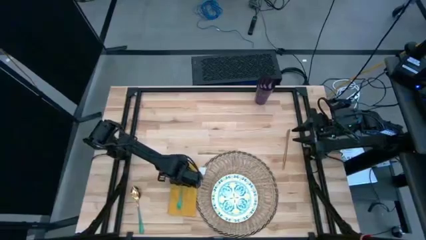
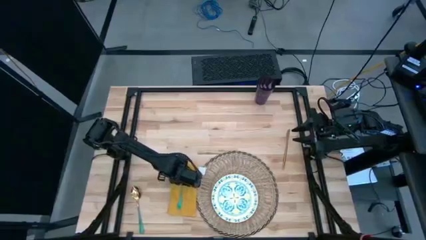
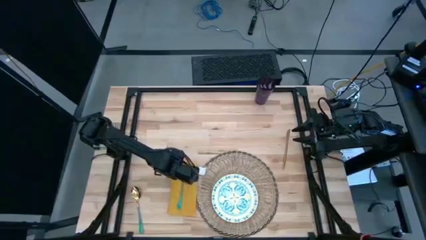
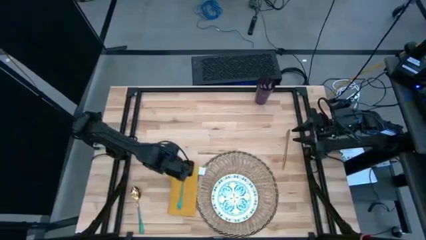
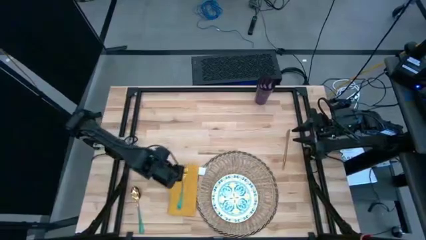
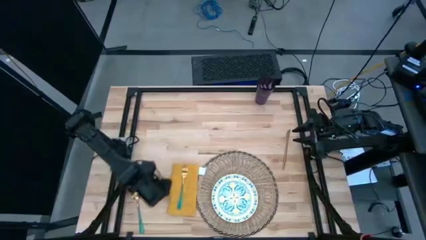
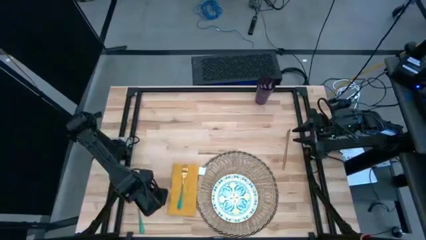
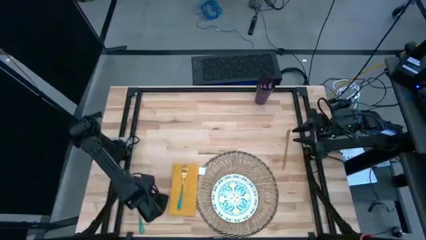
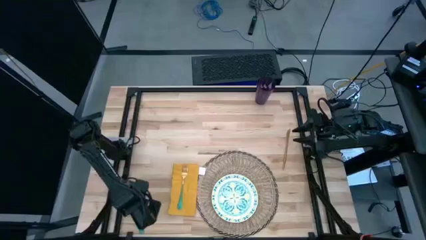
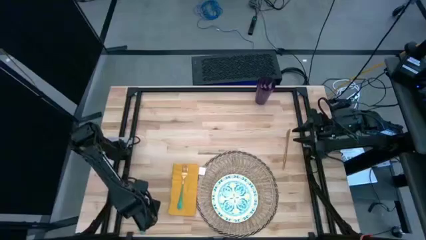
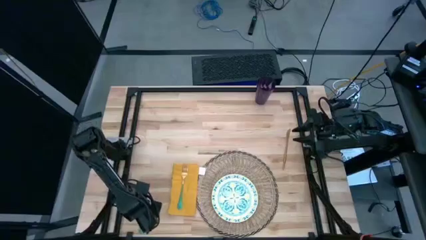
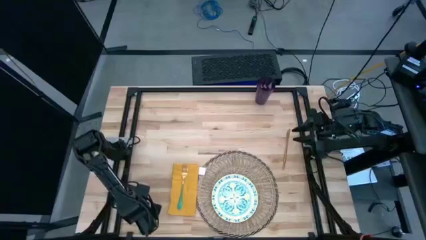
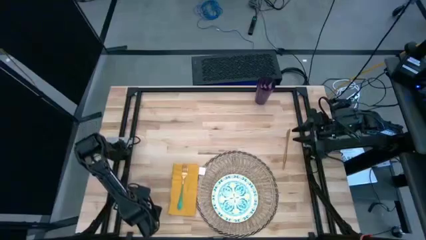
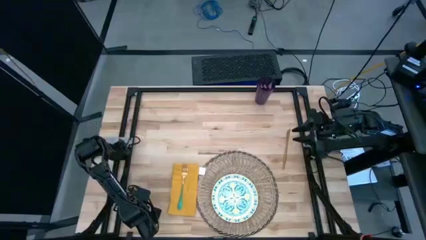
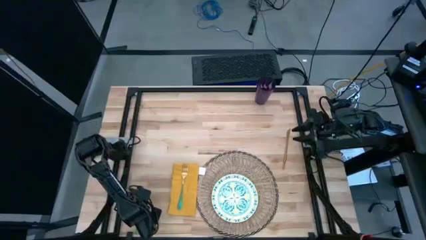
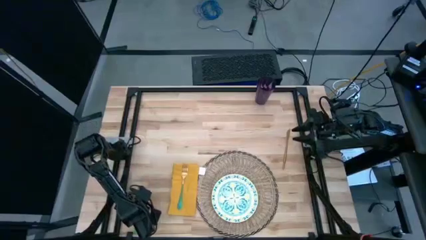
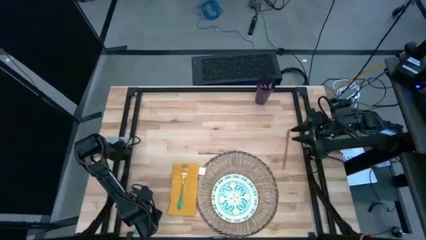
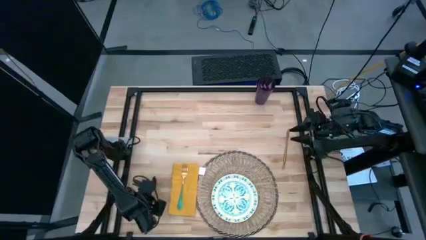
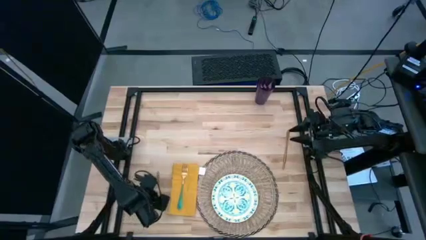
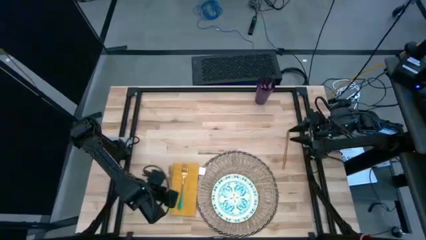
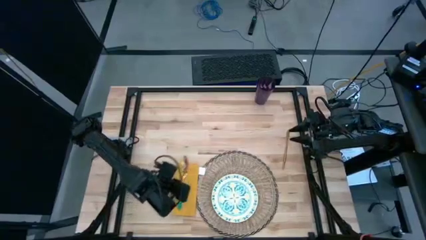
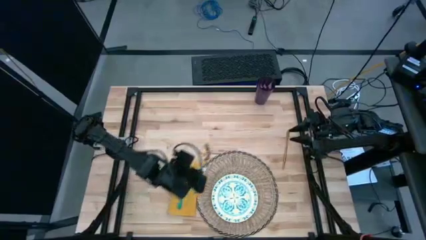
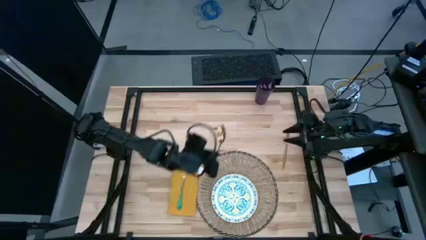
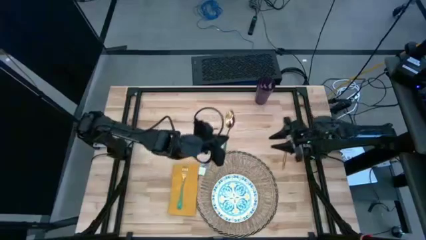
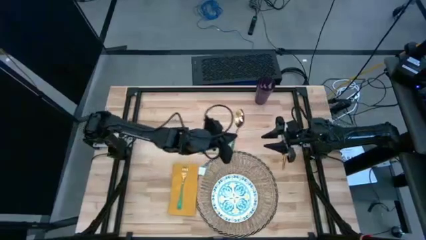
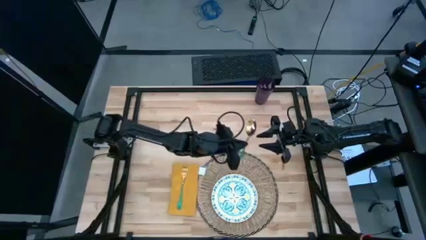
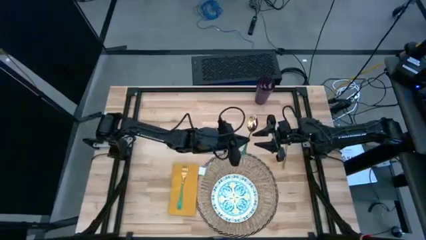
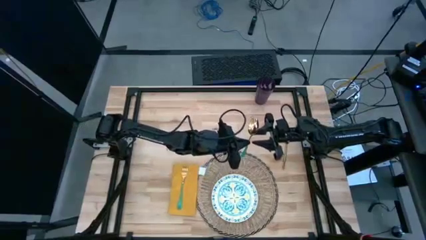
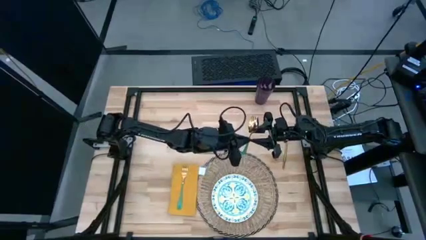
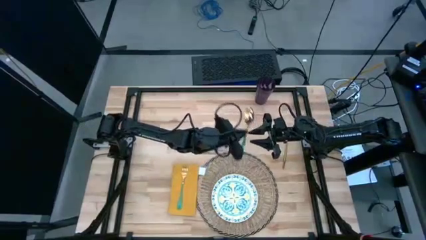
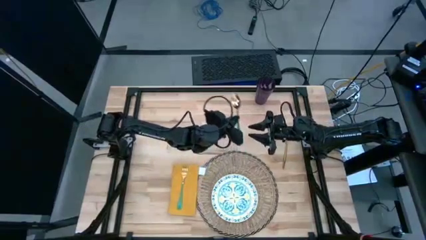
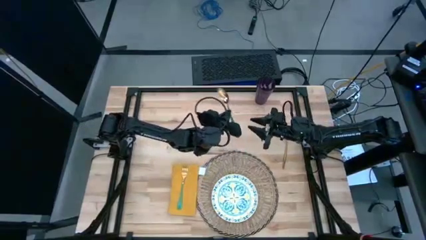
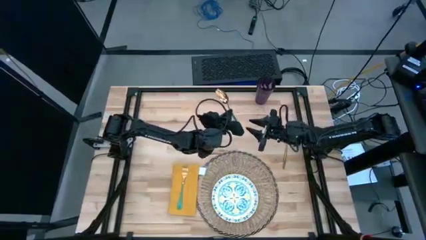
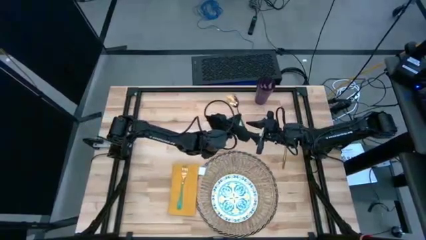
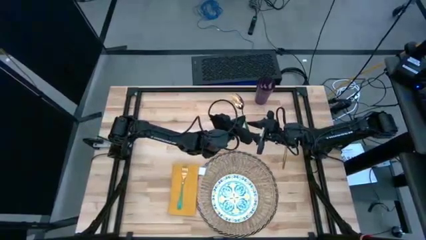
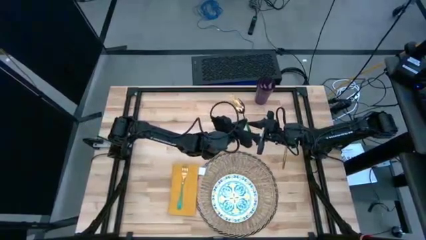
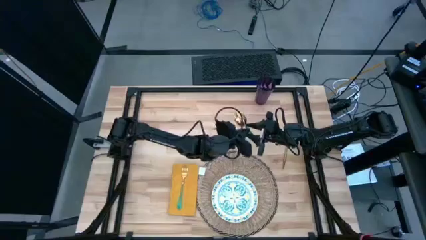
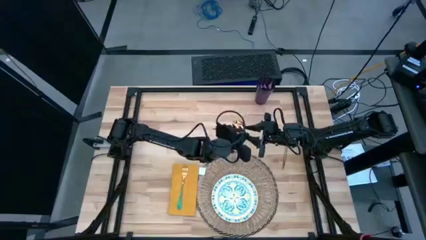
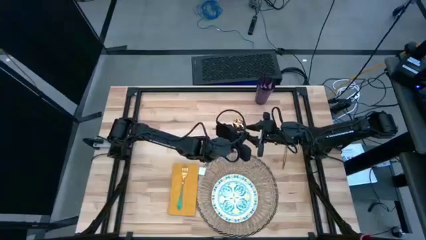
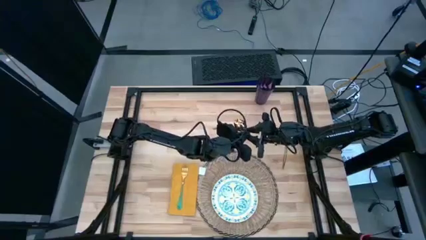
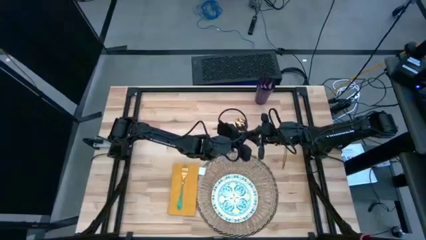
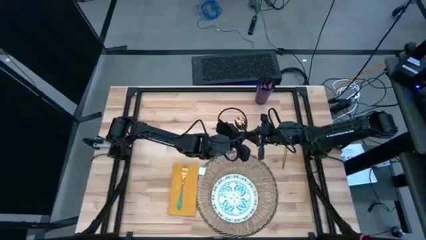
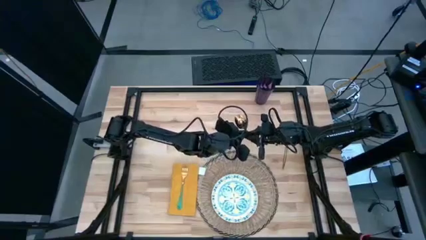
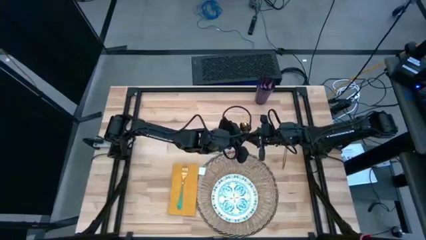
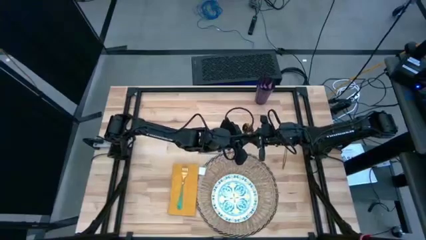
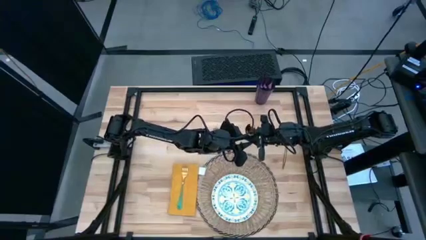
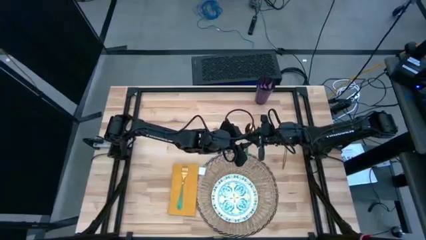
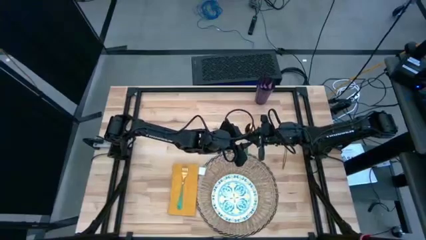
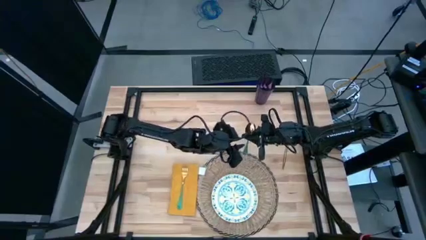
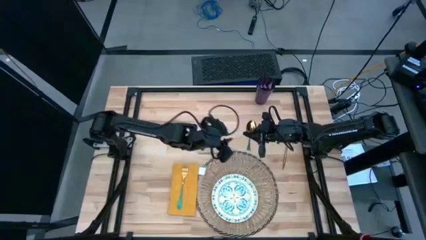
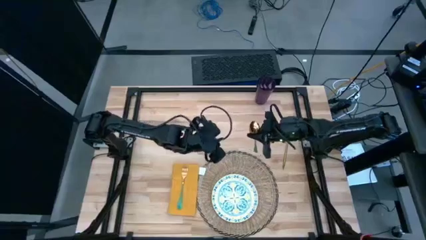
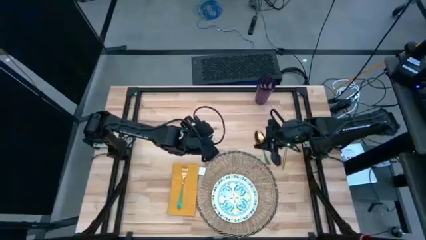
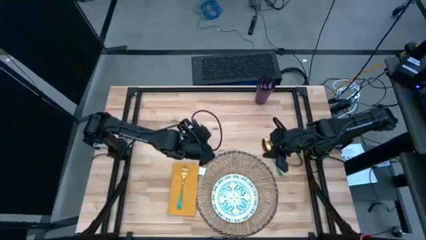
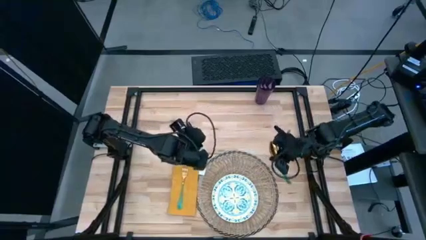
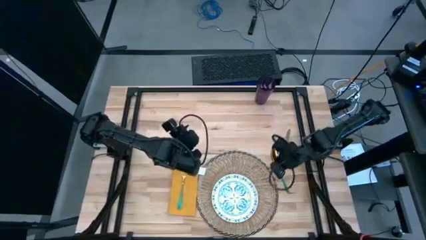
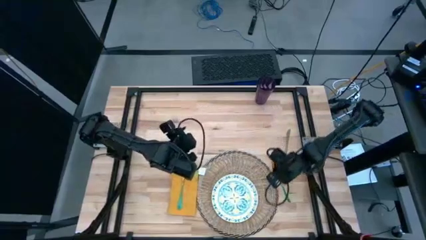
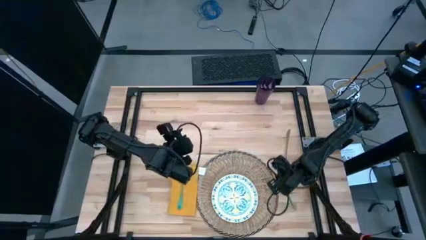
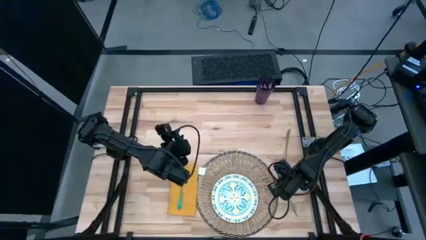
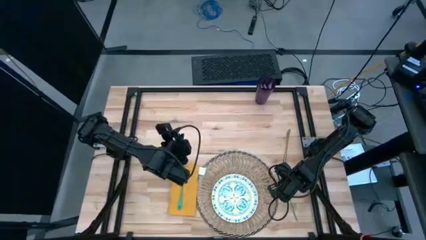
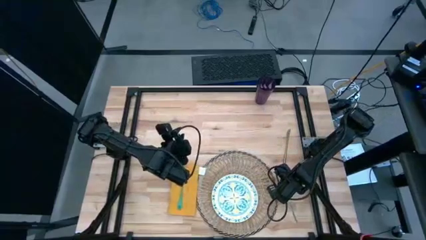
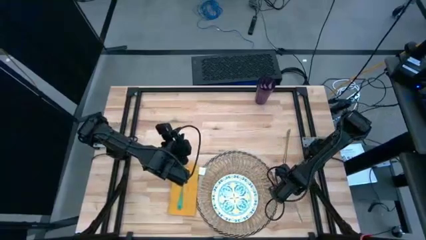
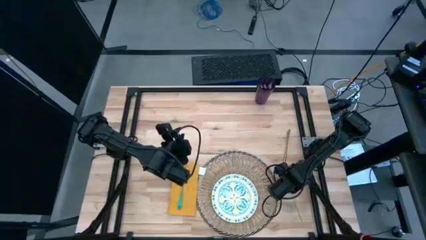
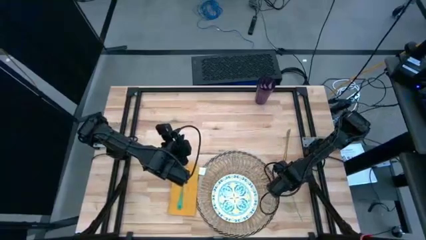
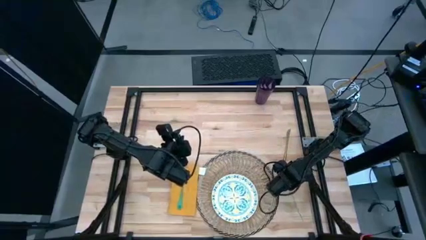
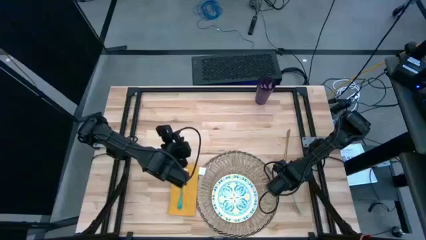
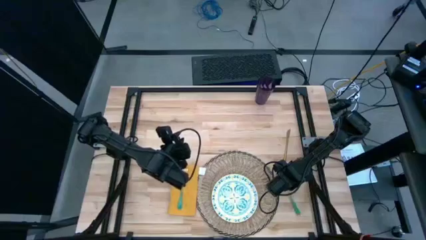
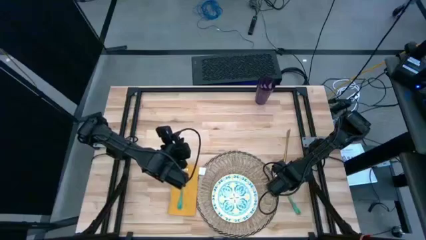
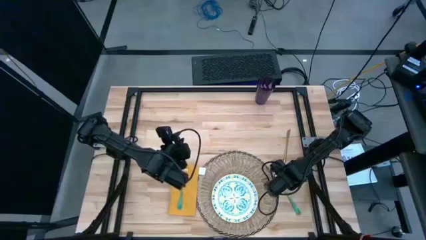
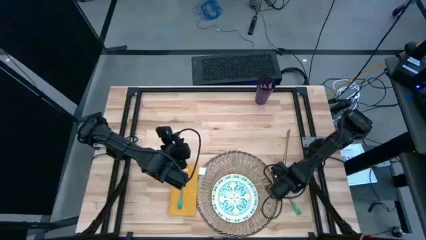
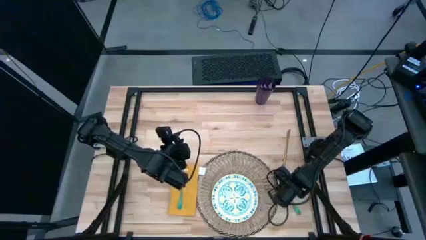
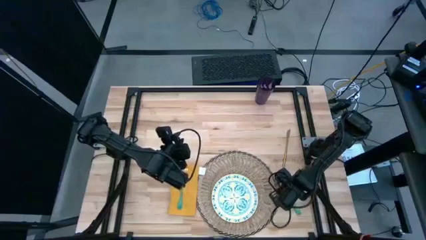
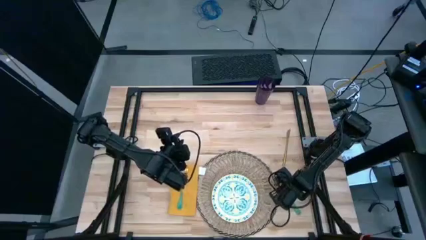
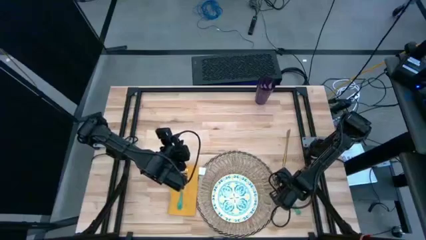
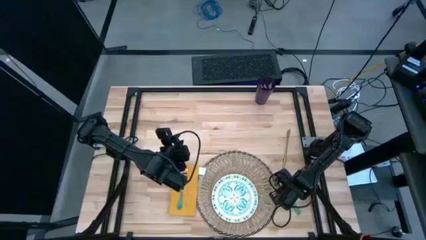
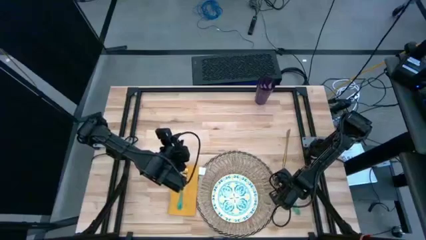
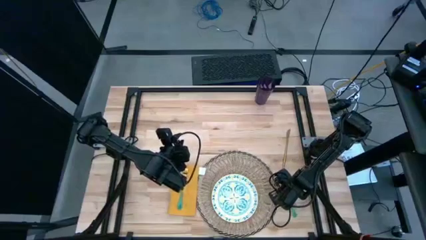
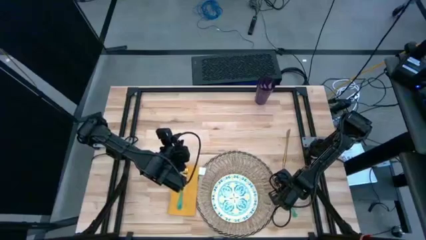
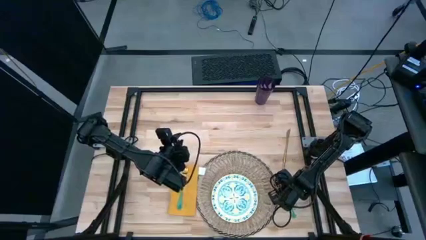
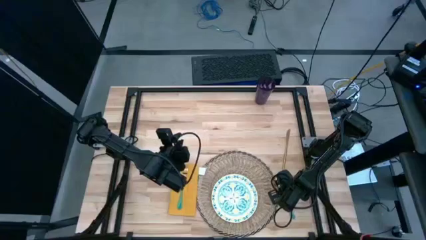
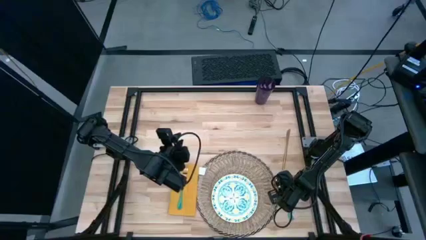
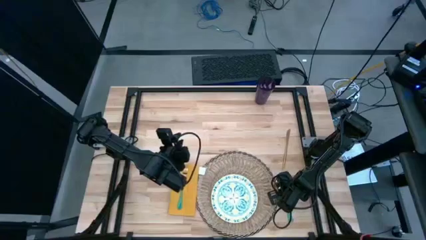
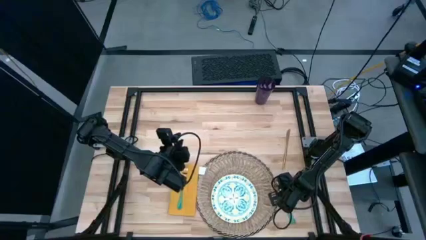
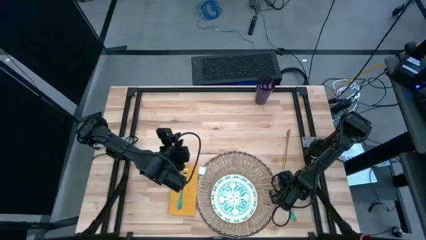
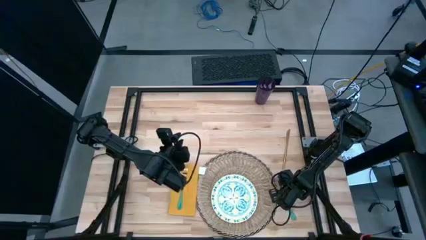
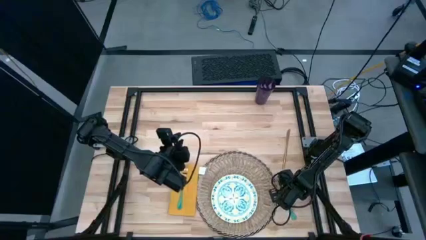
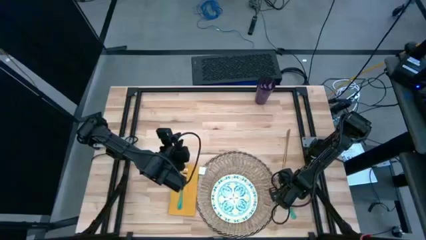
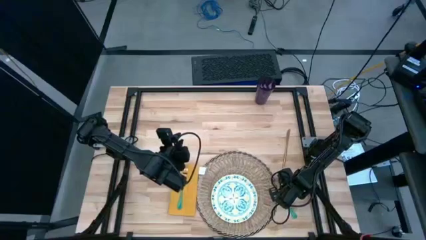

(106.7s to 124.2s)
Task: Set table place
Move the green spoon to the right of the brown placemat
